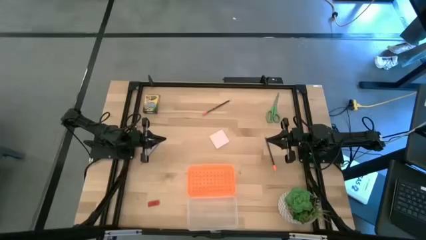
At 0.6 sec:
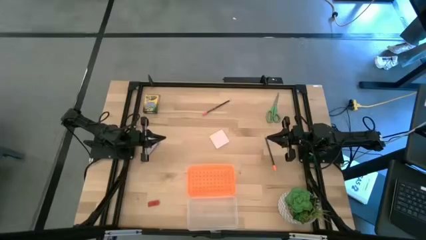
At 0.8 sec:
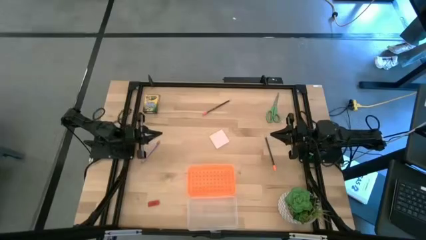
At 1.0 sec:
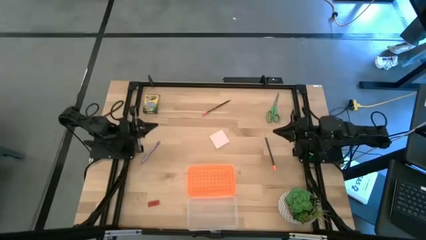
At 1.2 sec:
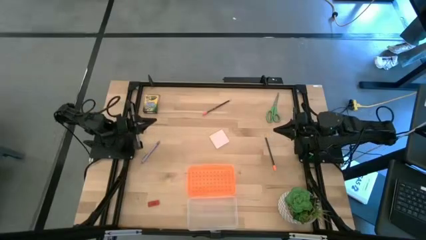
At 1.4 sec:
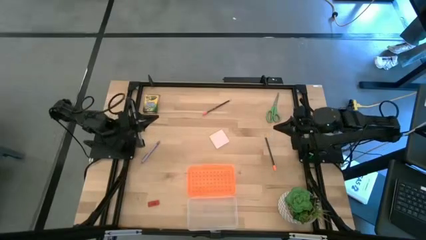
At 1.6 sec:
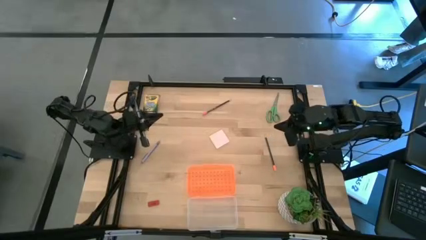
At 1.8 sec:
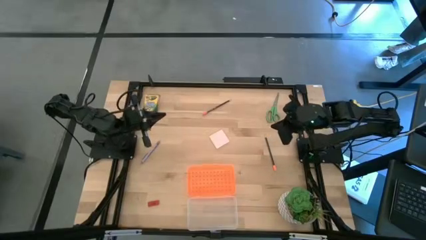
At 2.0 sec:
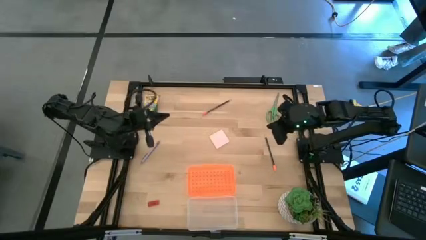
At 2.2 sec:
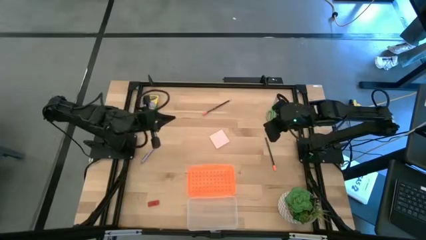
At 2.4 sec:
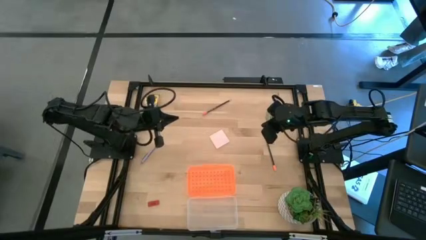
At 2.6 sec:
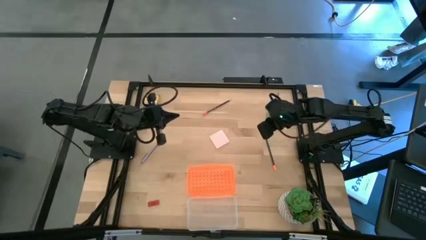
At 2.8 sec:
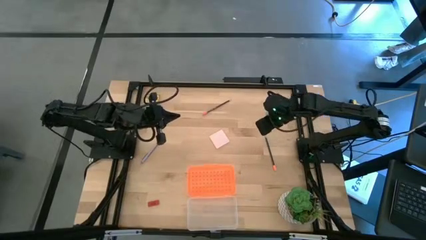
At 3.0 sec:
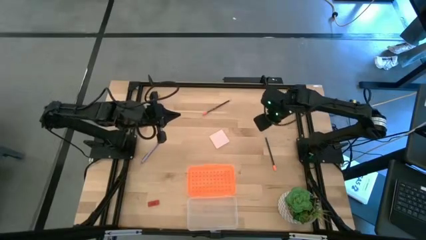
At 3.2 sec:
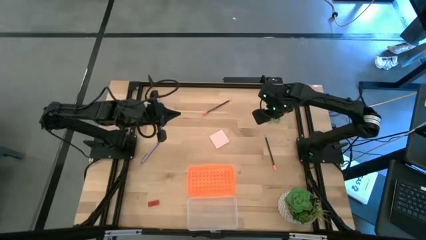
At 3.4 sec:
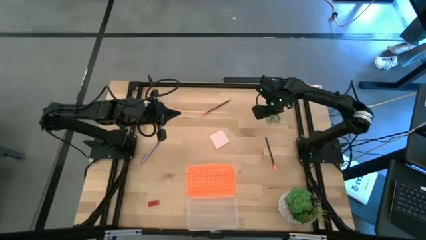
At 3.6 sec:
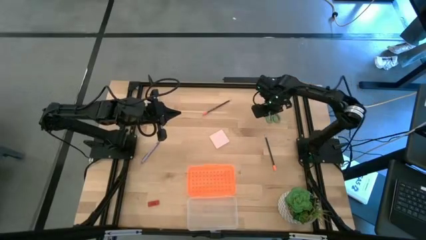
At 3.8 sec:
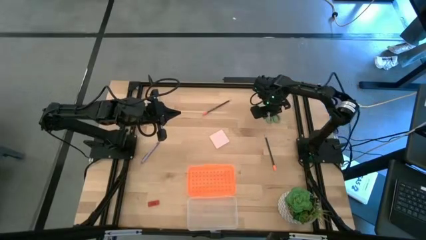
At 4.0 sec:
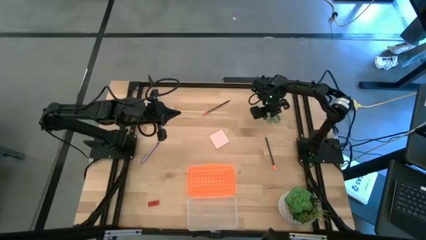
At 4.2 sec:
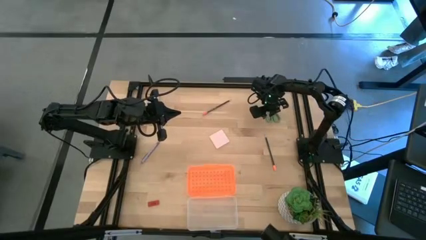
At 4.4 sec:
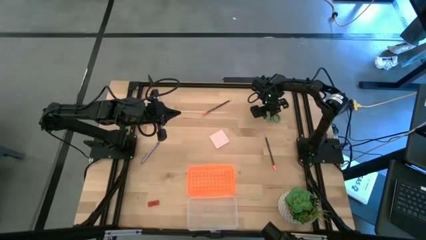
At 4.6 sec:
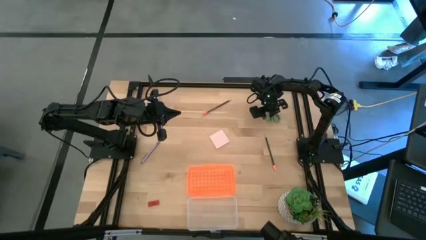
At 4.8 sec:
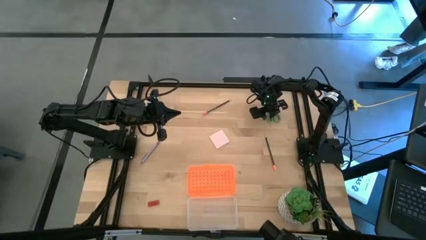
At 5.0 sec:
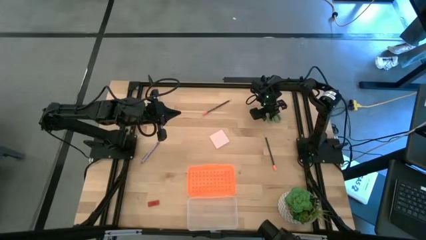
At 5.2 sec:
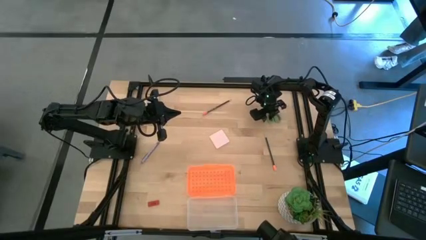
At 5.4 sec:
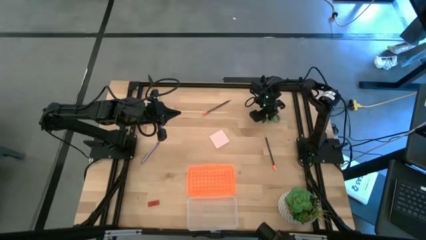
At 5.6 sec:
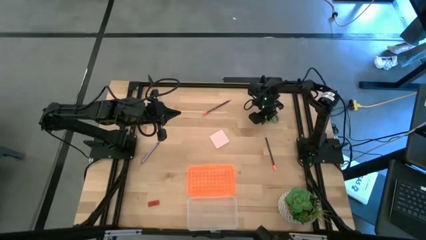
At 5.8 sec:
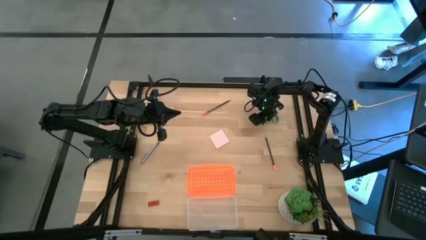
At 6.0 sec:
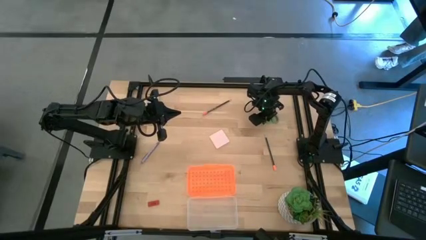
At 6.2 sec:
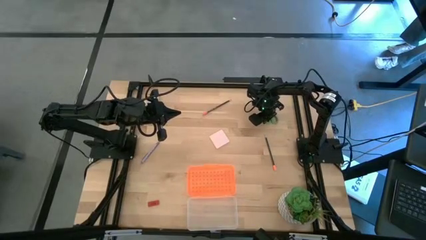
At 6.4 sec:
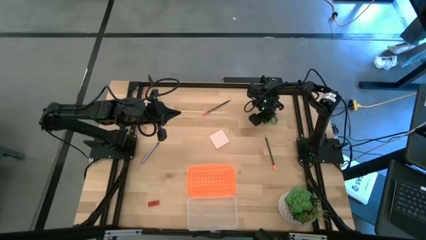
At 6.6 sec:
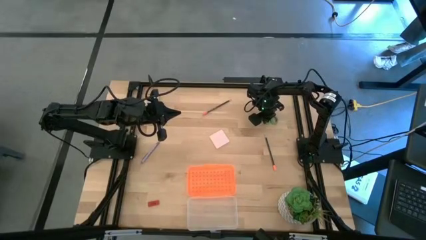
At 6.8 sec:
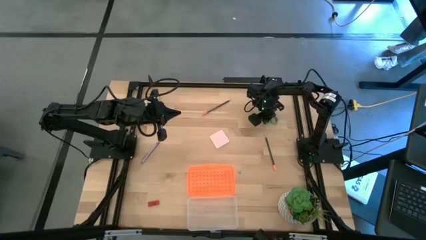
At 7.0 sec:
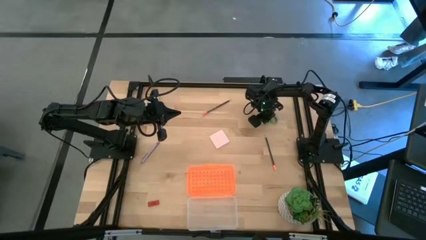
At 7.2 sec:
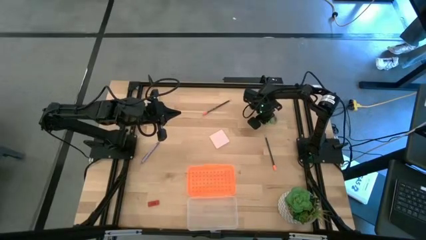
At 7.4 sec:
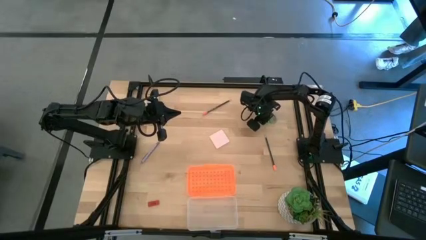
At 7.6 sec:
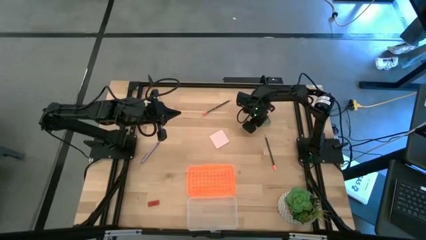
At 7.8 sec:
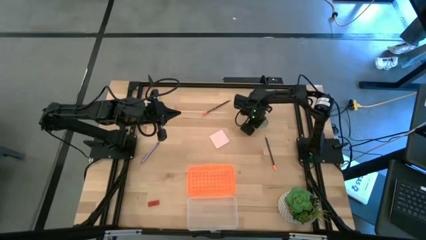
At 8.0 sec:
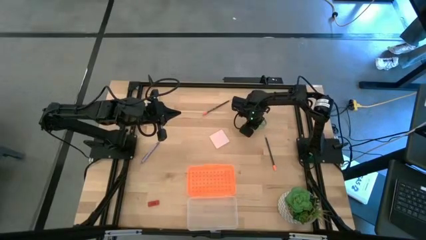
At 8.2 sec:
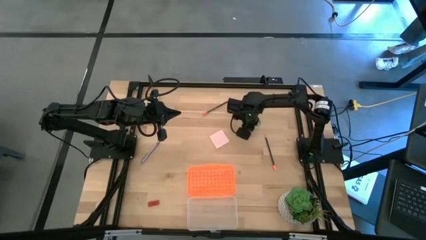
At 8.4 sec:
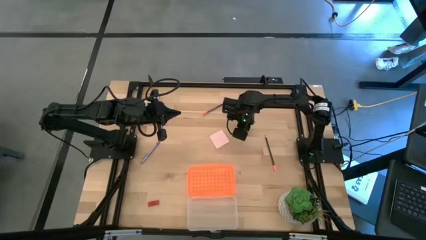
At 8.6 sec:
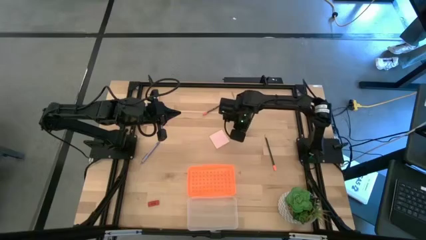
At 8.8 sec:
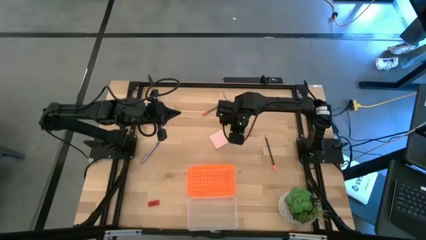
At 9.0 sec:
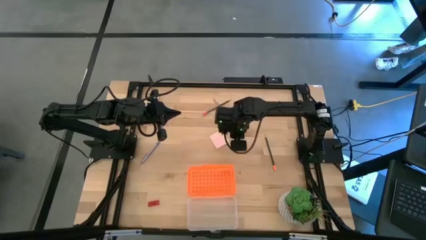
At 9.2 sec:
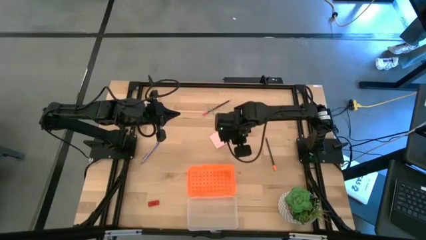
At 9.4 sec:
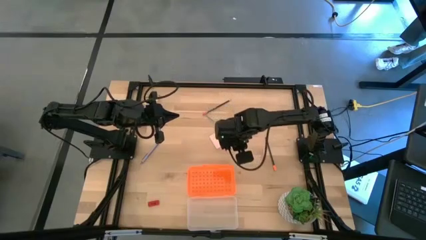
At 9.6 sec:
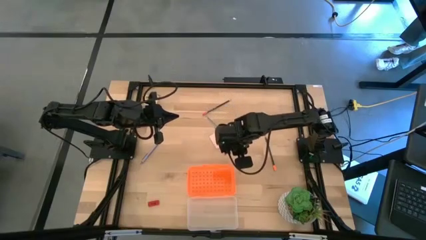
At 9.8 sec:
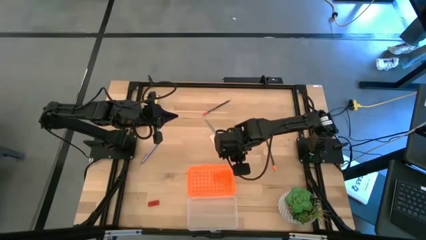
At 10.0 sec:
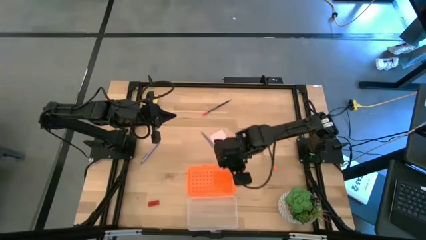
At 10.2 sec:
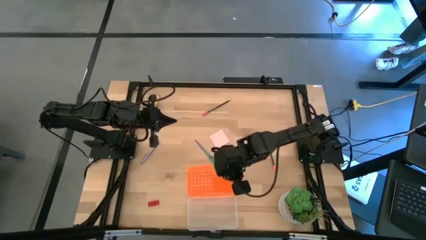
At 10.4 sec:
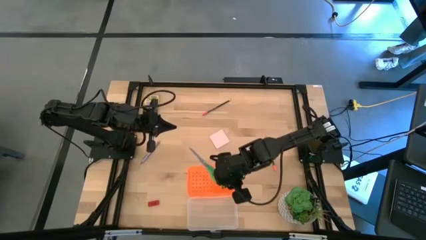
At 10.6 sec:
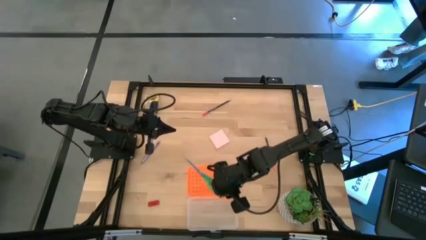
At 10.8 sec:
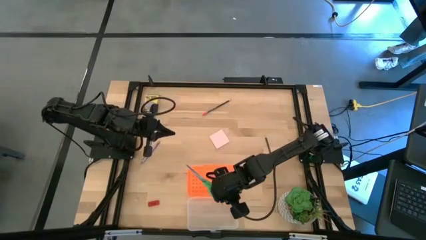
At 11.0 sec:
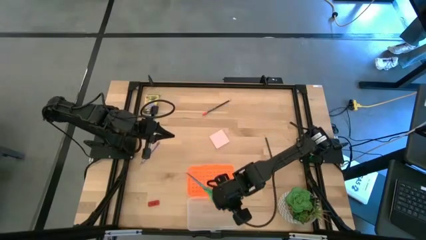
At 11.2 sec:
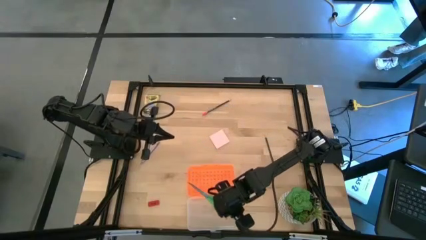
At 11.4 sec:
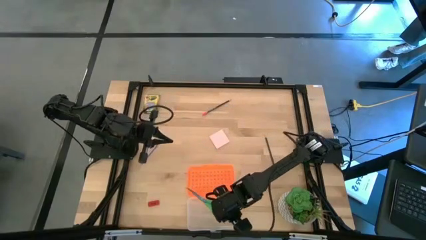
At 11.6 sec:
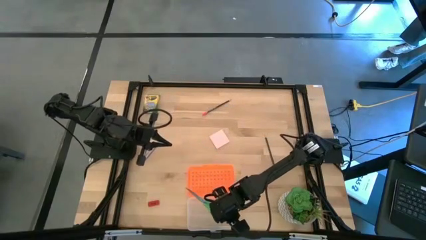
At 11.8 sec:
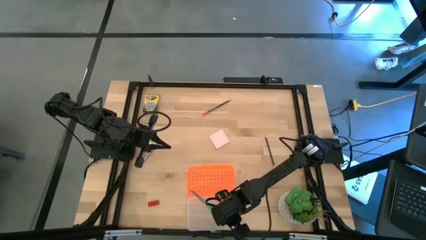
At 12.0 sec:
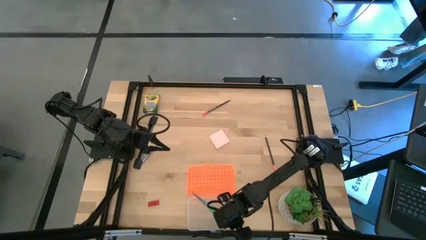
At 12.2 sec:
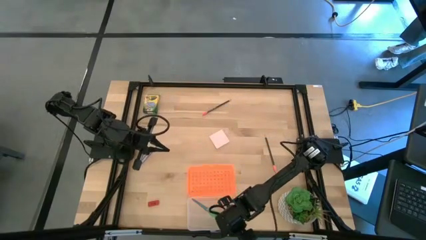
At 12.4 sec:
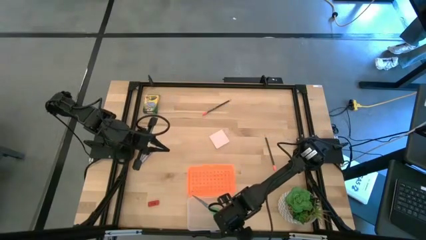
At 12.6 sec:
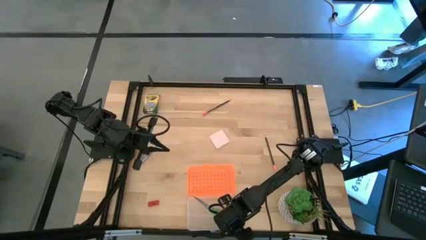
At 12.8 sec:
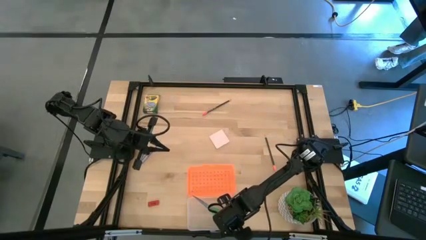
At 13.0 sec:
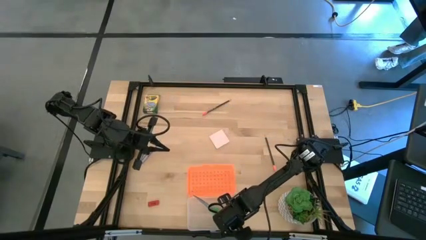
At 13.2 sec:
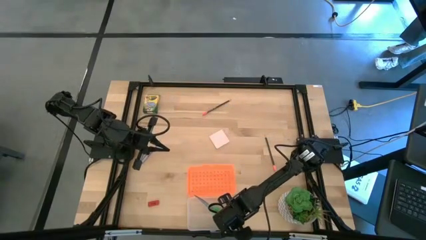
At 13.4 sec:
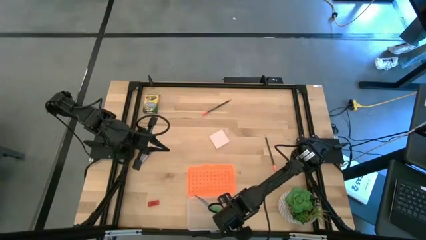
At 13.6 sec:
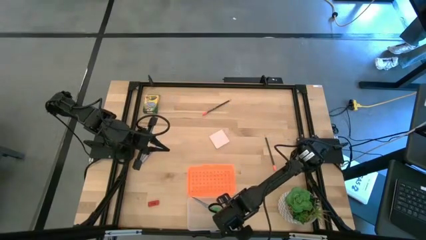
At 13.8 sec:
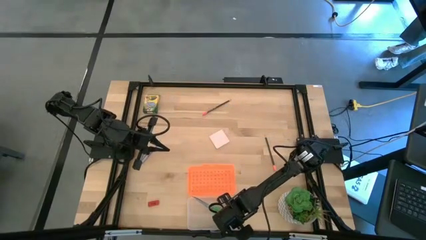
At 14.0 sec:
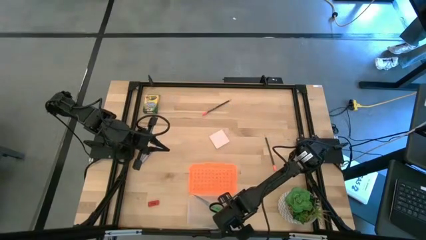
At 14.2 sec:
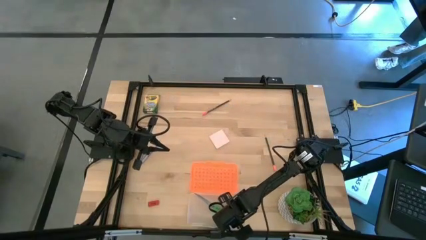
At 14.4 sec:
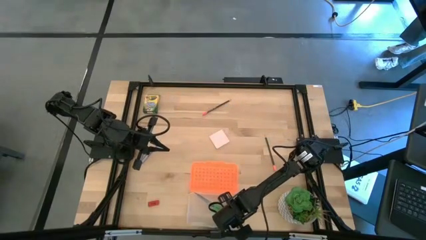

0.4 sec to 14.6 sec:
Task: Pack school essentials
Put the green scissors into the orange supply box
